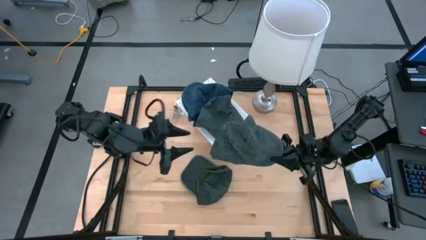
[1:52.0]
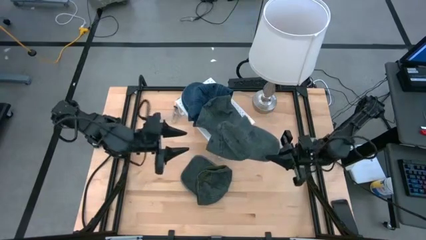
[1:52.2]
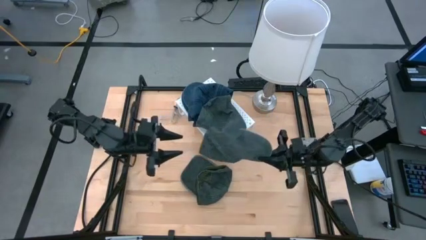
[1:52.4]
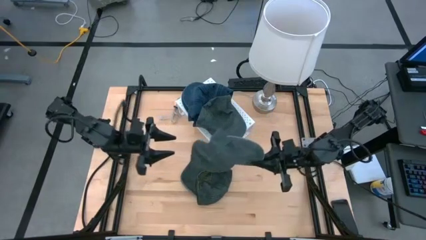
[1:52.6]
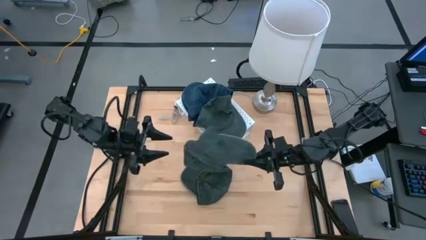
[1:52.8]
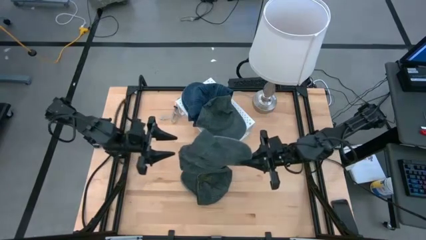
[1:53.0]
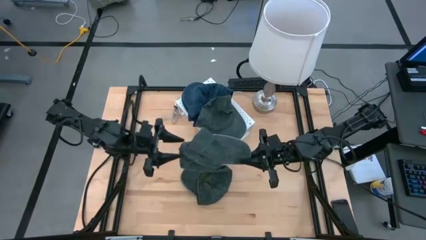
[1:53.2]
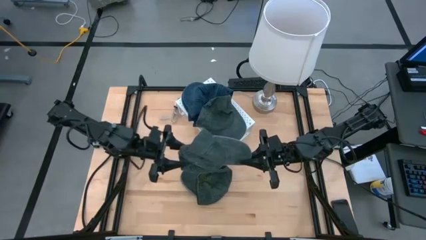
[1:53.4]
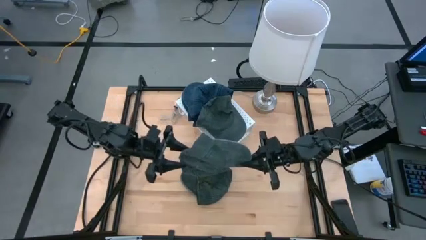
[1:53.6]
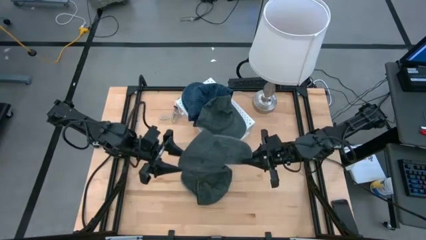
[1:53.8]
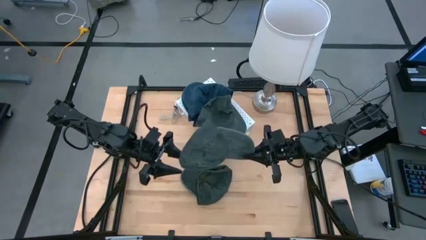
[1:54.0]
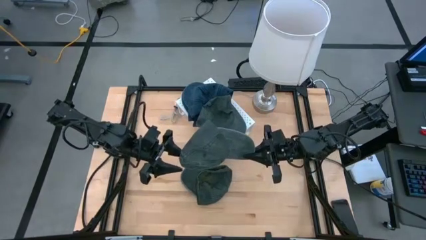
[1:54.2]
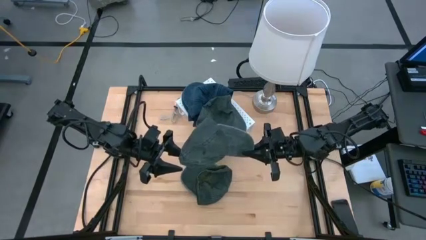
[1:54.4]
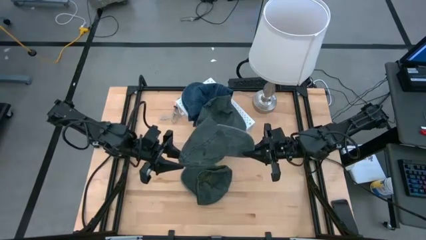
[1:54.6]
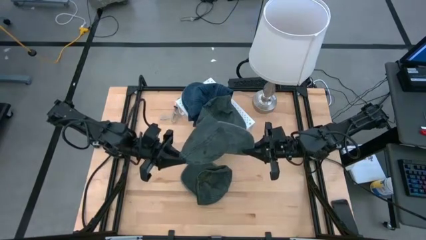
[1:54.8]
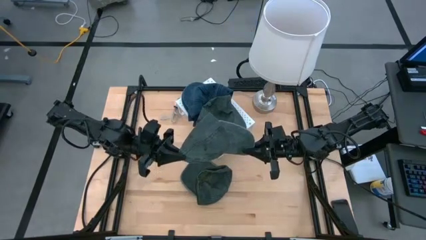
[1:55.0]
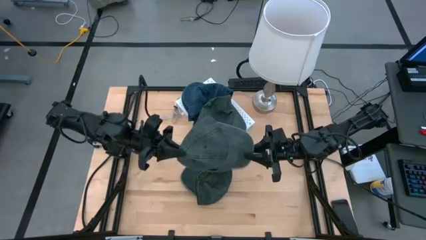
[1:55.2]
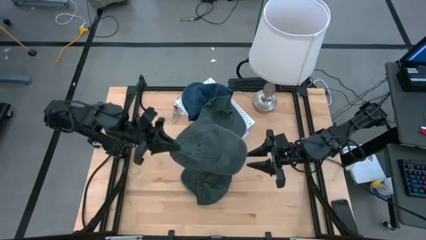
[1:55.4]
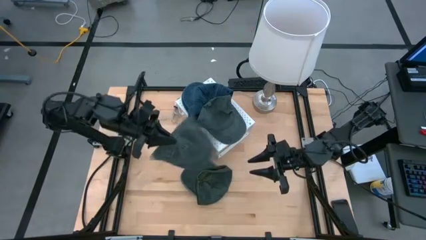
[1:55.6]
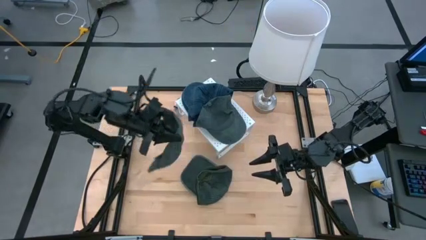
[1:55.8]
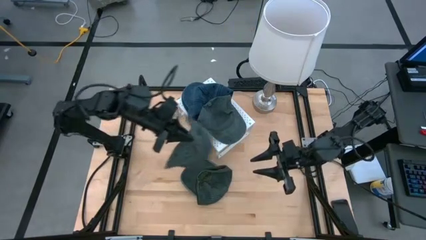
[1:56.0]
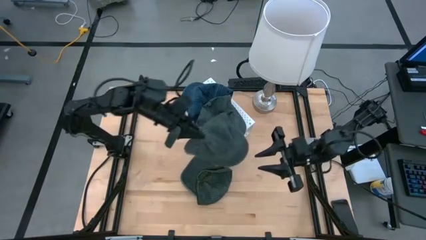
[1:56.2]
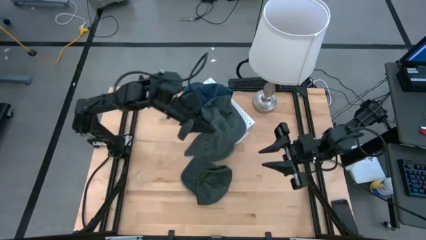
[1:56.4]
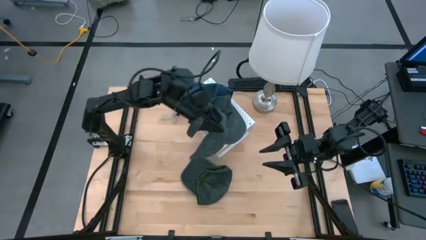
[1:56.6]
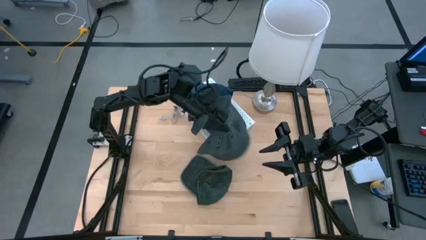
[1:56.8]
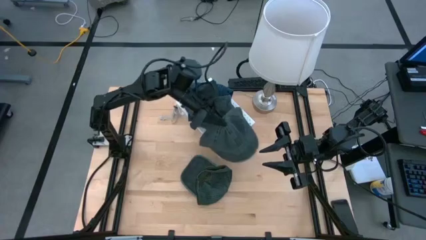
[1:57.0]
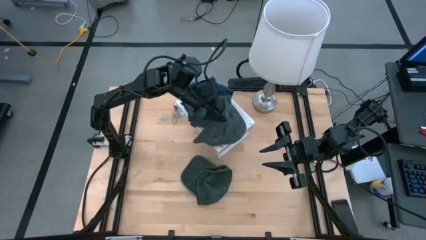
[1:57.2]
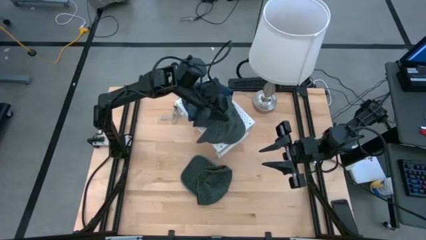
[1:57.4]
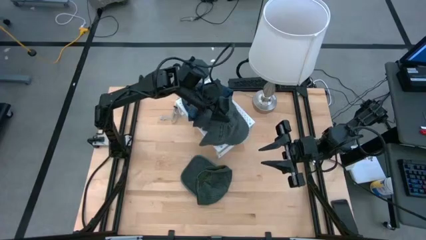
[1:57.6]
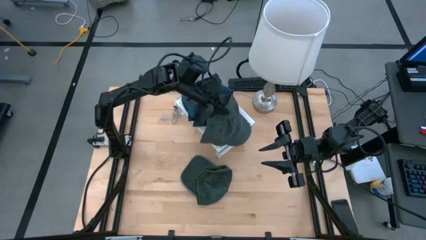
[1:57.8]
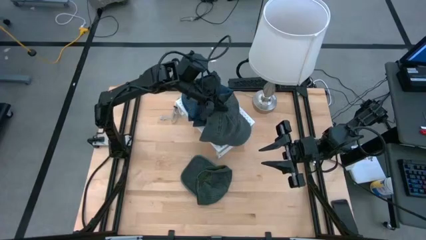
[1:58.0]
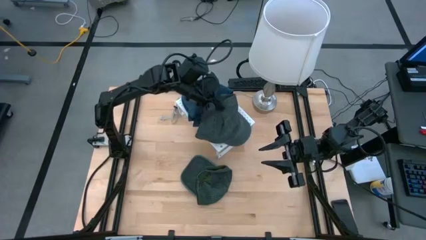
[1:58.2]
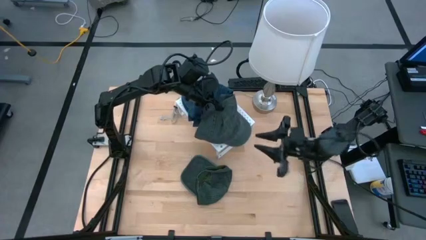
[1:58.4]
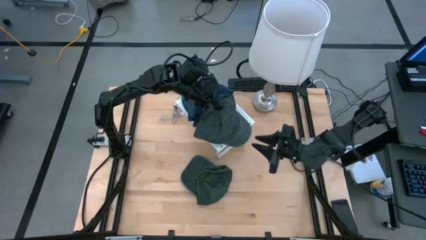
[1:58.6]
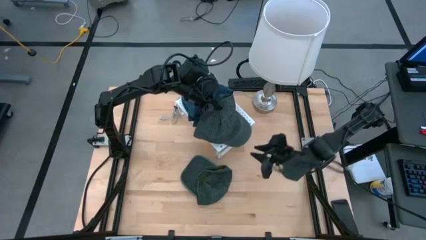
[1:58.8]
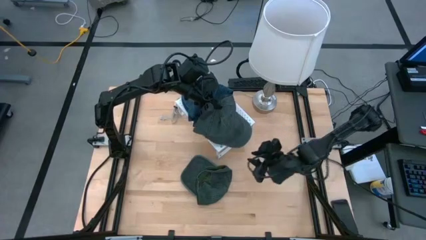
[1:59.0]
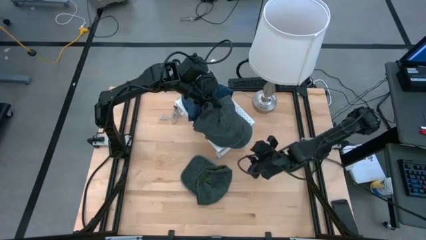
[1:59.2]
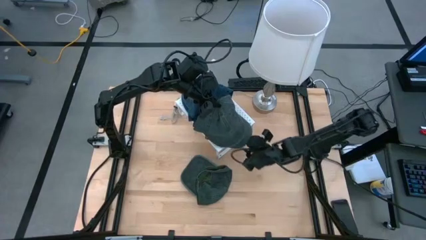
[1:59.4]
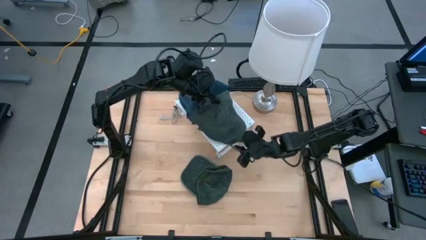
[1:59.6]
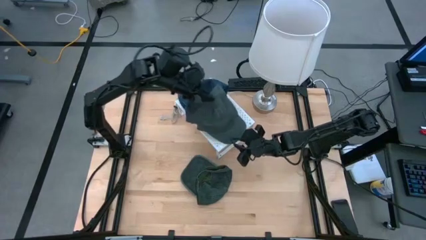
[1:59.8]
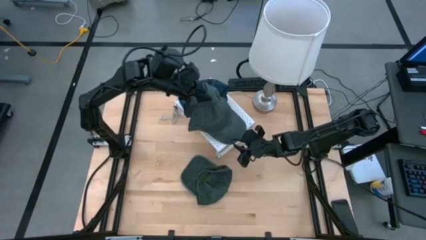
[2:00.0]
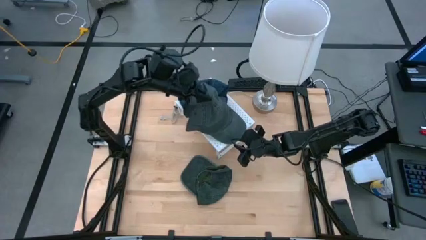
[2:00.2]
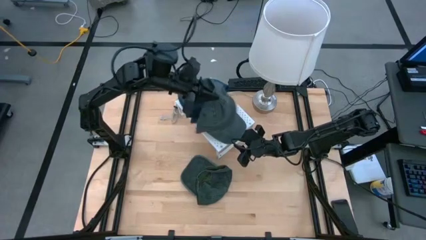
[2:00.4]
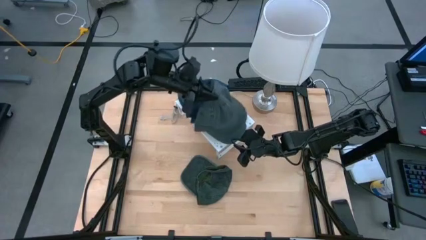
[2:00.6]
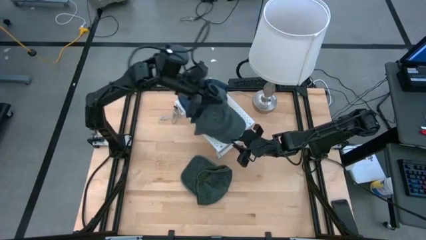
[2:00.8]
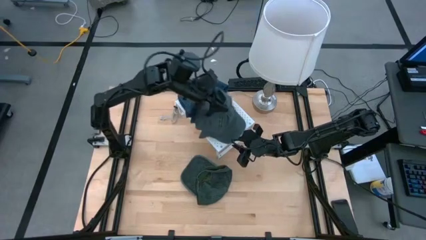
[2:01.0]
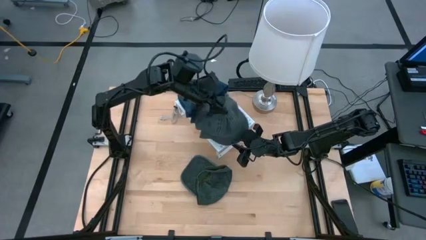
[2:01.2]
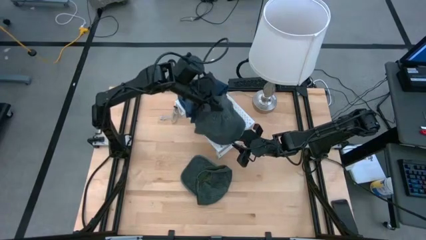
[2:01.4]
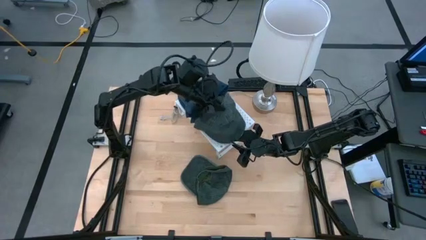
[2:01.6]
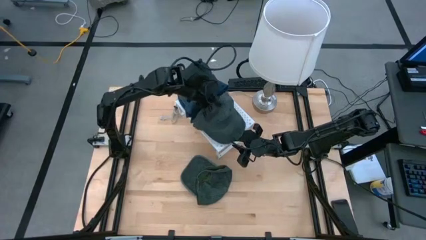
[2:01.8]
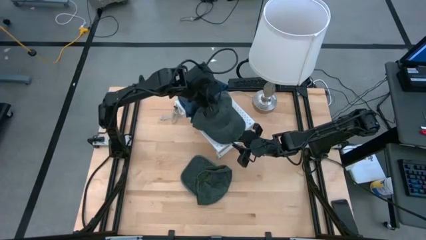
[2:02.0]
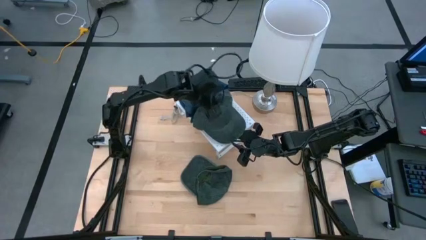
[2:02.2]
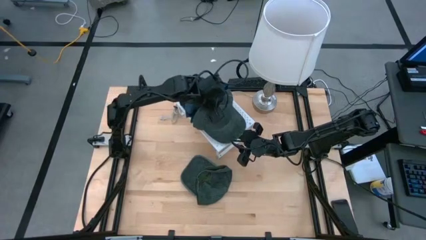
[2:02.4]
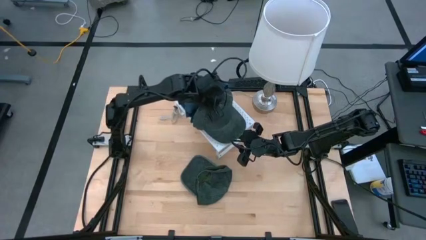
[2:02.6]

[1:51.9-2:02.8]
Task: Pick & Place hat
Stack the right gray cap on the gray cap on the shelf

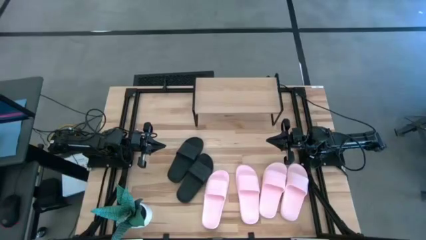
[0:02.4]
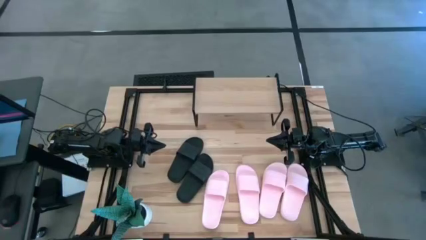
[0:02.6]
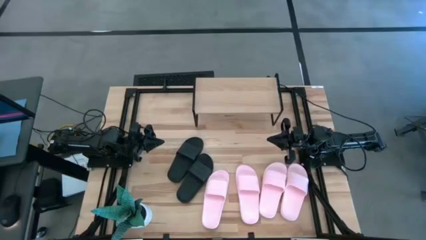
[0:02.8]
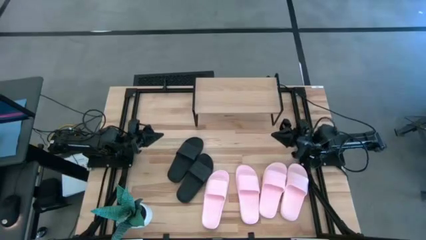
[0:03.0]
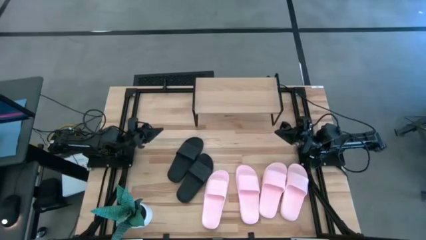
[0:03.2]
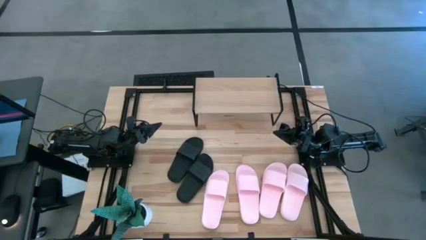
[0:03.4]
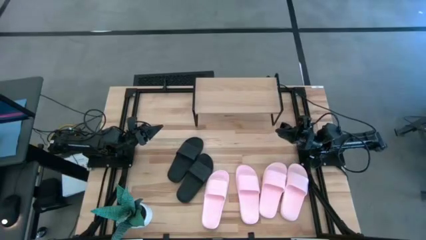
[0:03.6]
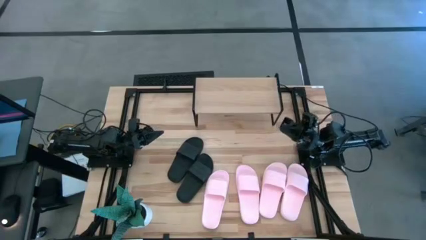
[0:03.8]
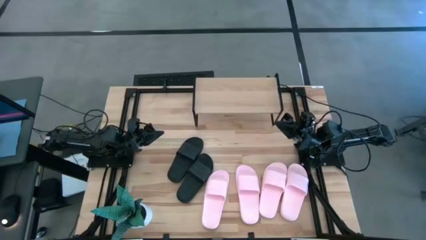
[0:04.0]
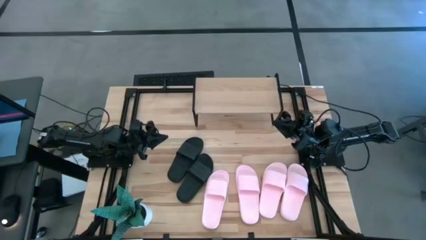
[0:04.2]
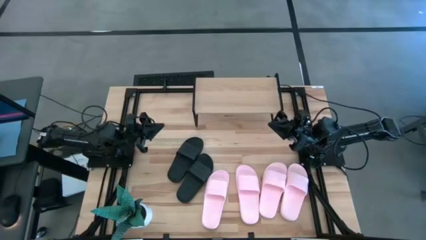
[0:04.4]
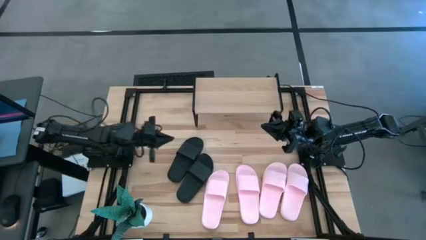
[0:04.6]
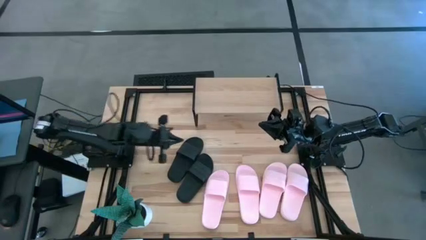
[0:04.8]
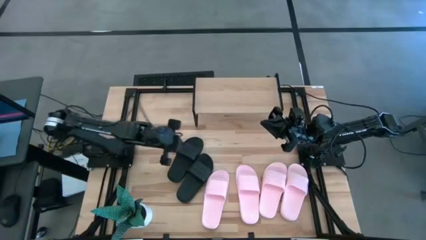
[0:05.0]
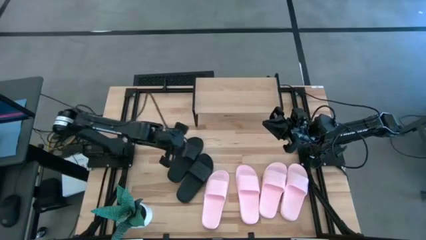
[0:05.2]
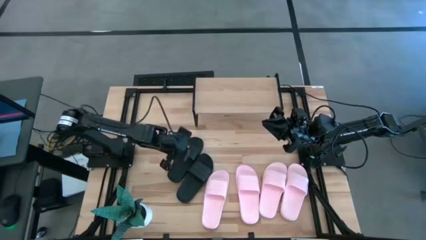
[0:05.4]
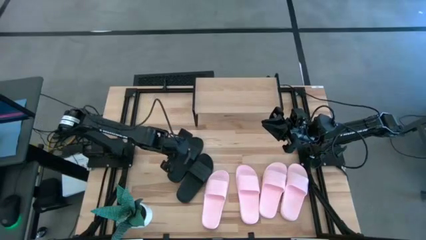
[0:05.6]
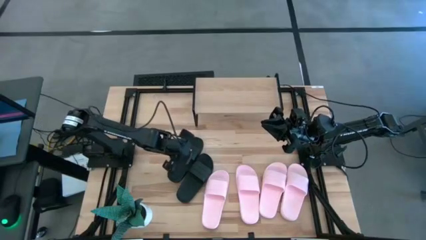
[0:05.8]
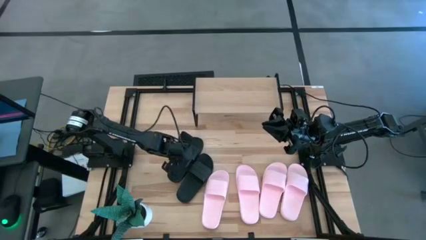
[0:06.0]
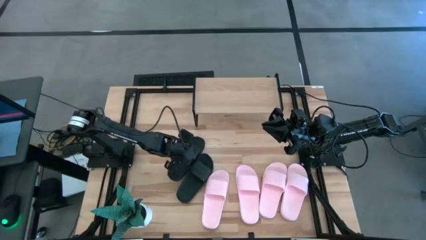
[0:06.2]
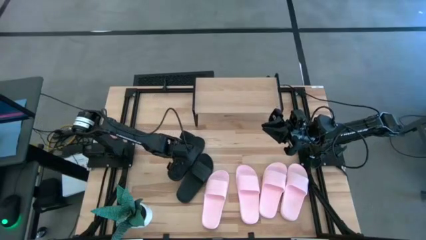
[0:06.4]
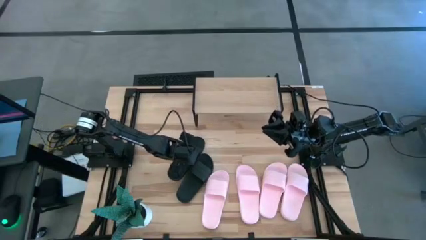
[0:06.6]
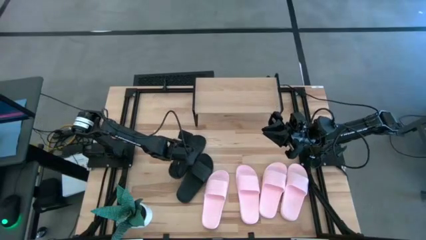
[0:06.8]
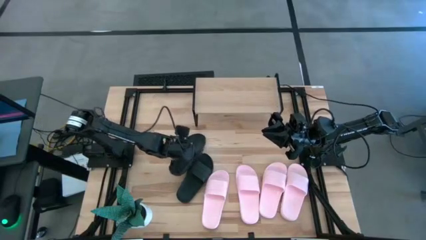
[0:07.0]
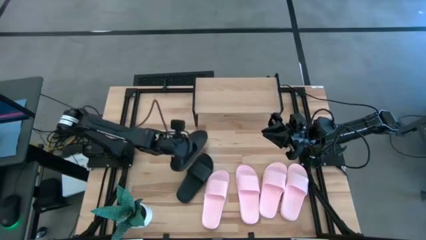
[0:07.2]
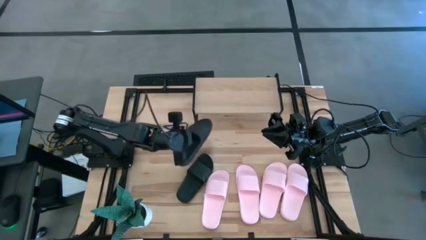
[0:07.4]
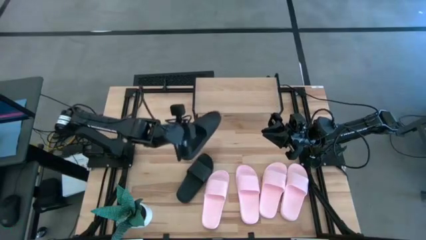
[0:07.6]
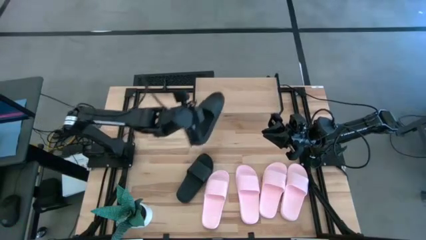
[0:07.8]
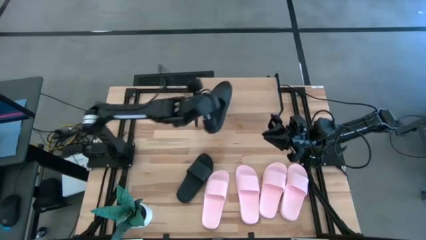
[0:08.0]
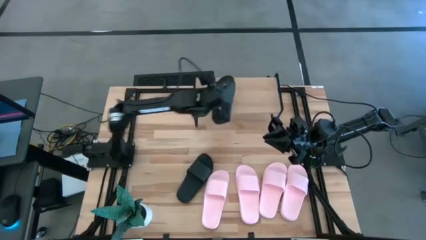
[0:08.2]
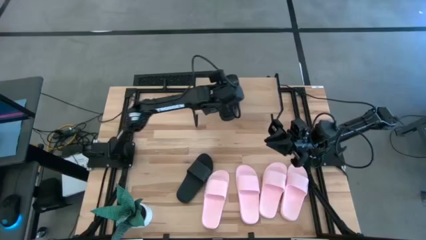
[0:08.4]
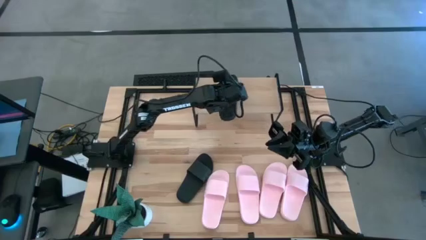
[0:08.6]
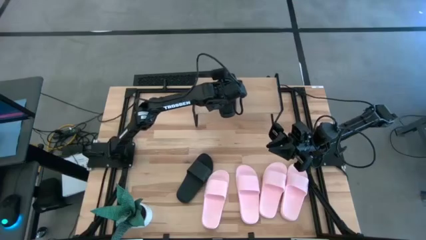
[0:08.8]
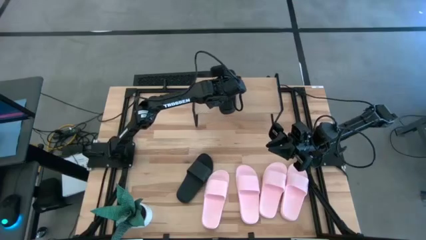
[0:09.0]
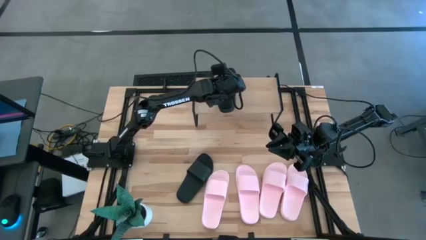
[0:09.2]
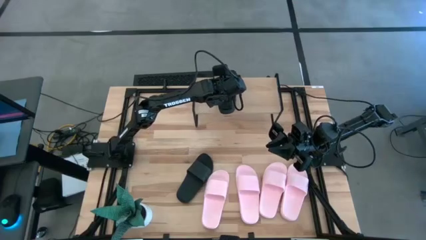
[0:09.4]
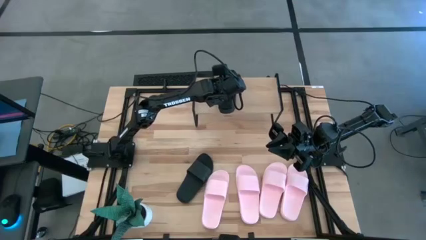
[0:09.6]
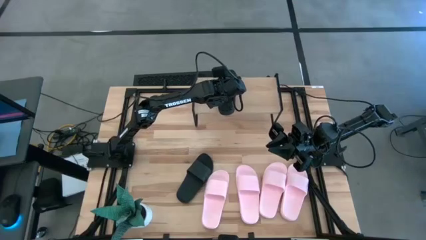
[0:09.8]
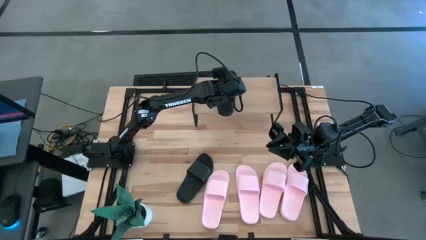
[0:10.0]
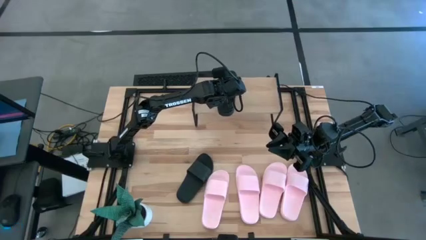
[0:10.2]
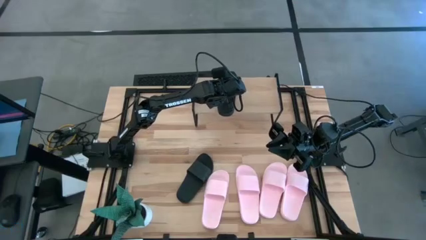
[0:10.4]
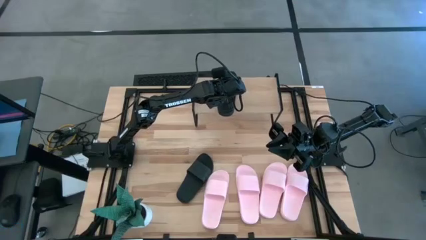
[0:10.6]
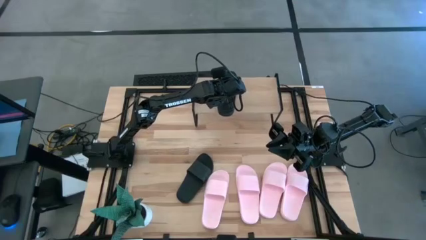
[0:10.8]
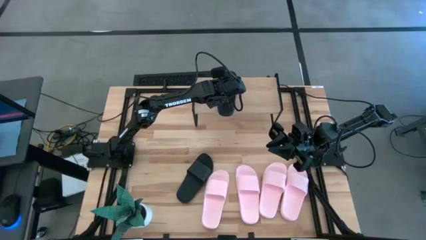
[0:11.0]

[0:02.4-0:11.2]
Task: Pick and place slides into the shelf
Put the black slipper on the shelf
